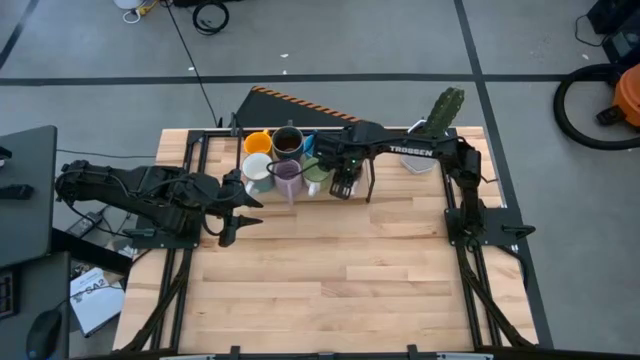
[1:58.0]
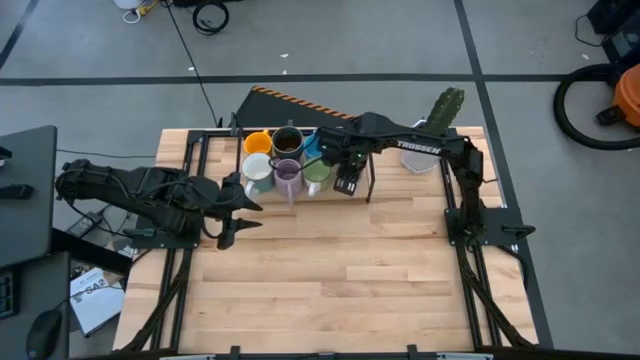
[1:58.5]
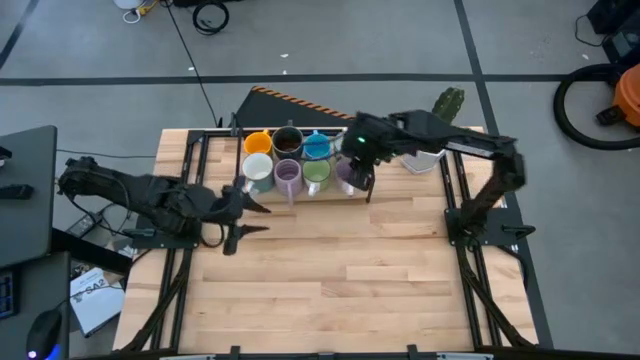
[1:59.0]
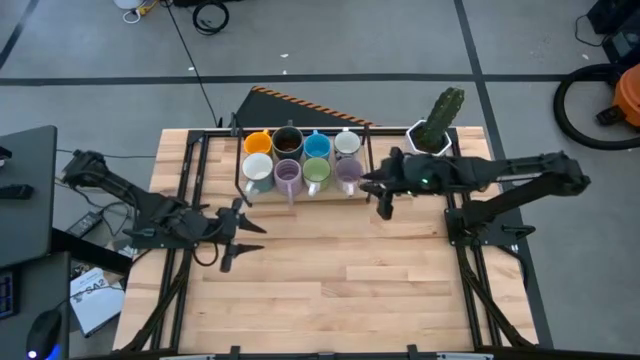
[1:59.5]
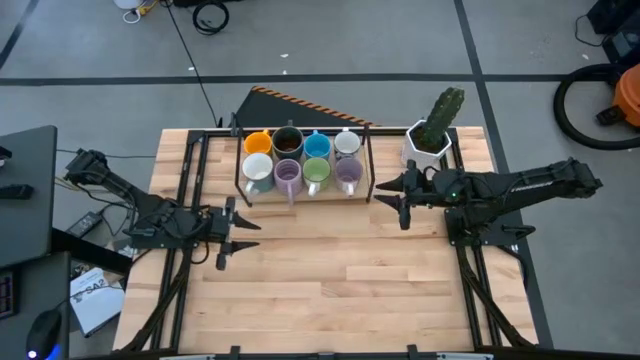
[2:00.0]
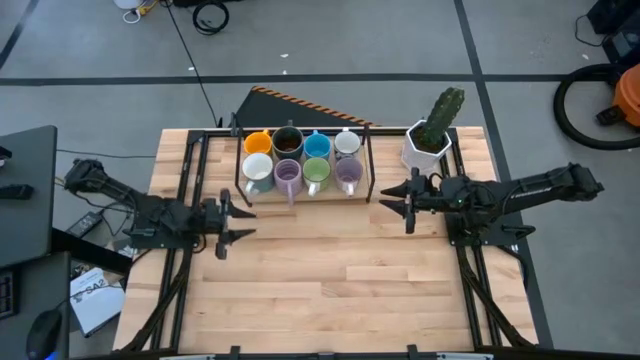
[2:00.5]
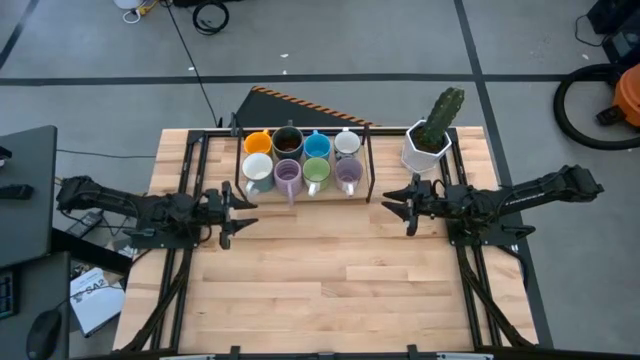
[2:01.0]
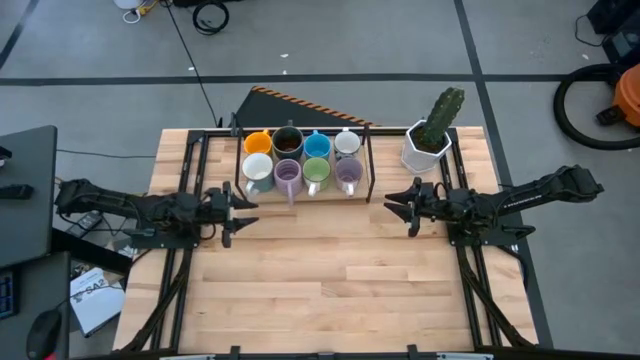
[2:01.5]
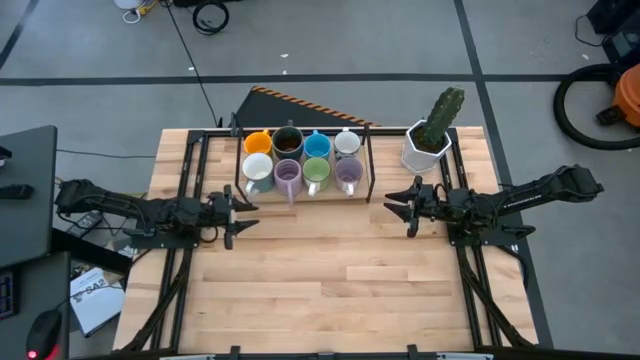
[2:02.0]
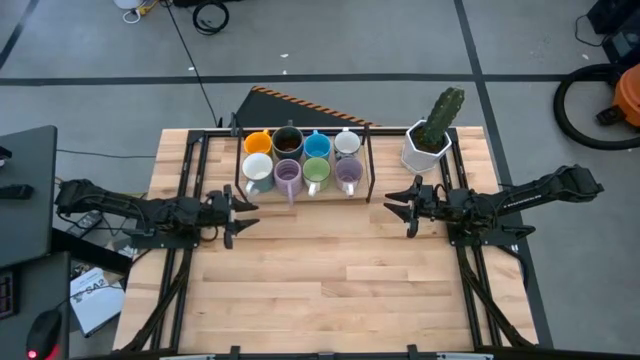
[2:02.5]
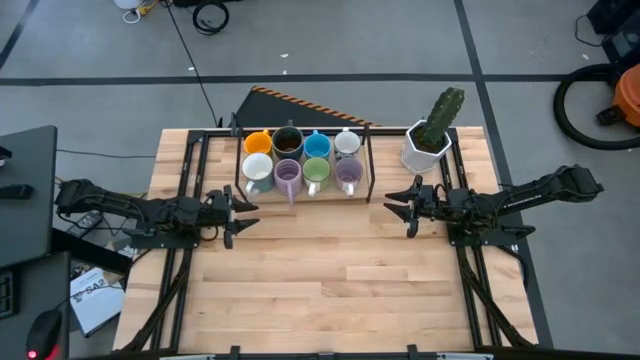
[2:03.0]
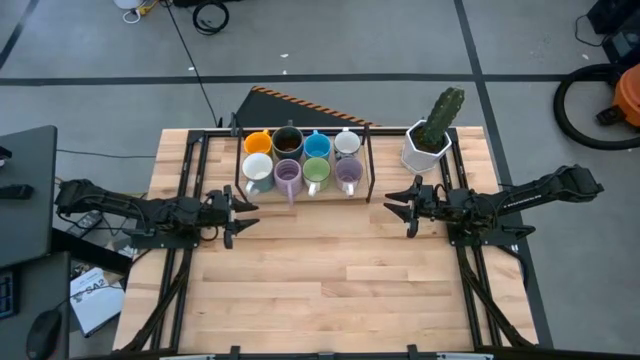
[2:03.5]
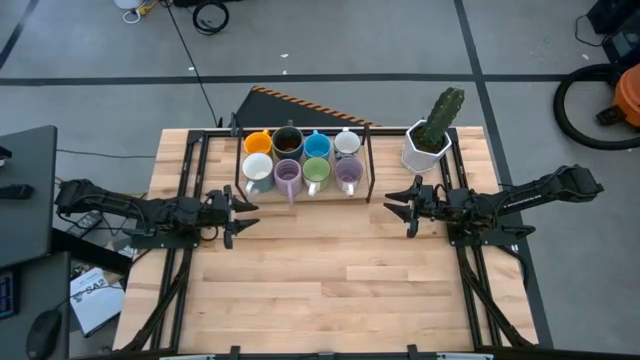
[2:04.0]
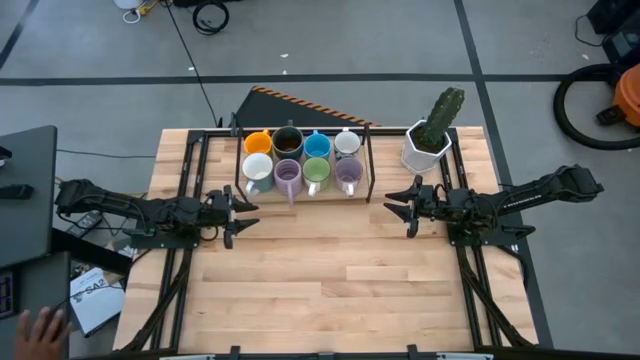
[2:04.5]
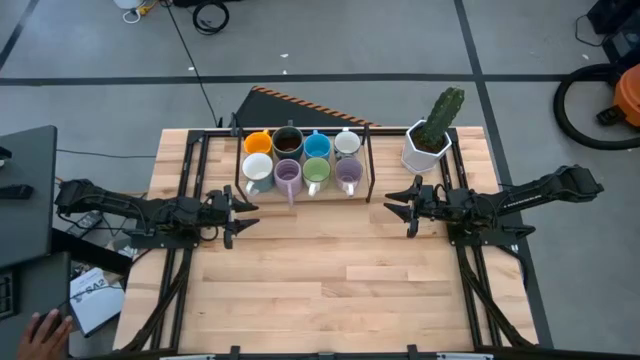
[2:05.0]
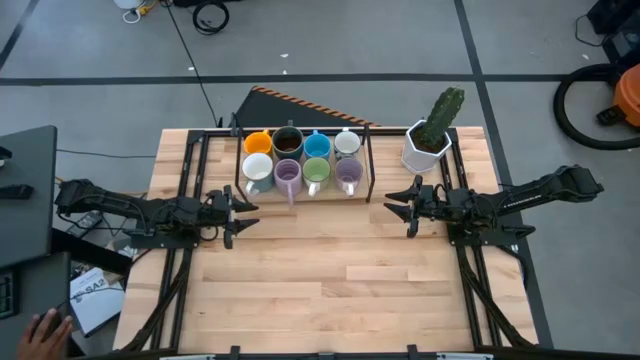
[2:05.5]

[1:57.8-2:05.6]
Task: Place coffee mugs
Return to Home Position

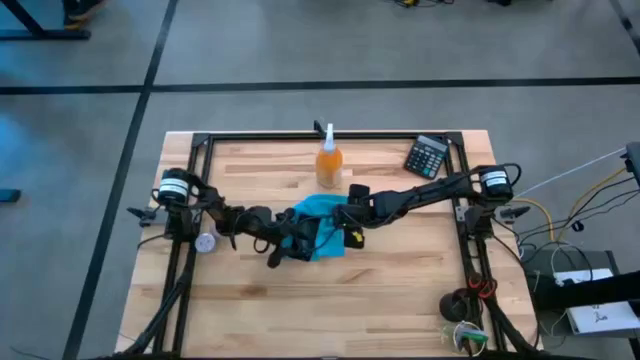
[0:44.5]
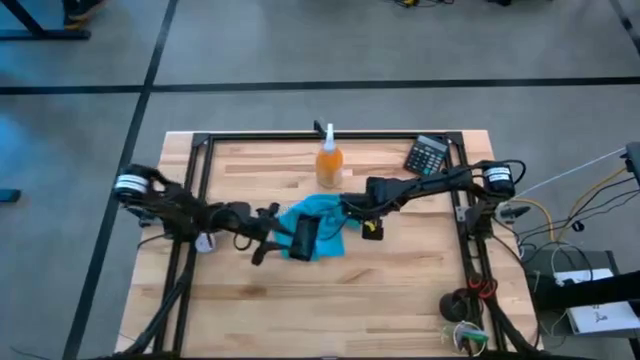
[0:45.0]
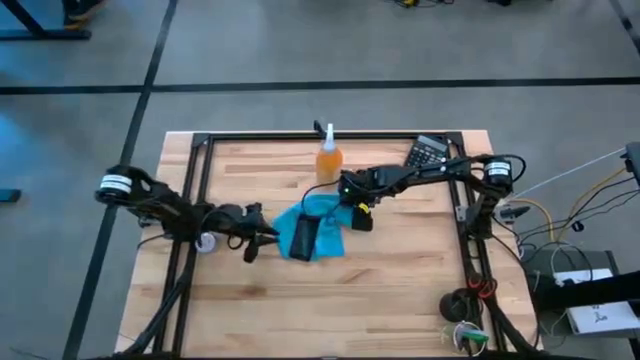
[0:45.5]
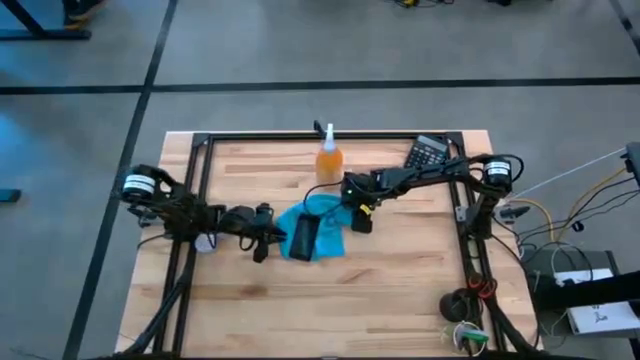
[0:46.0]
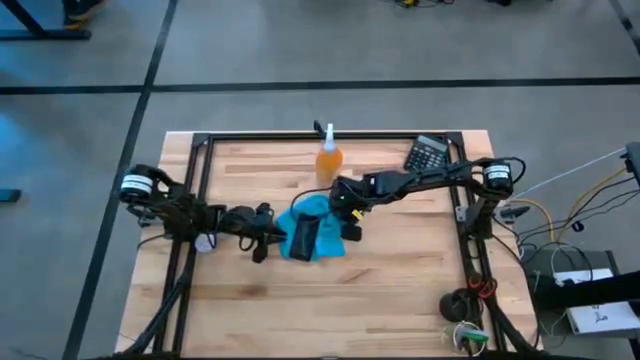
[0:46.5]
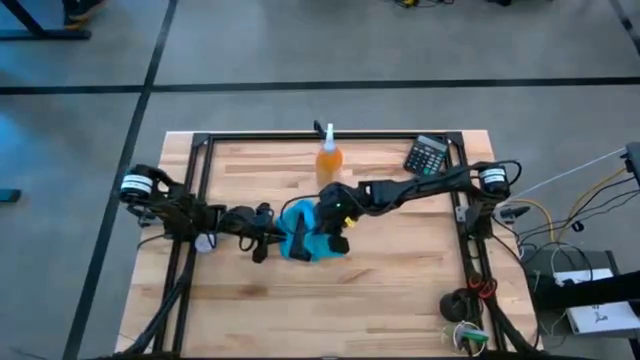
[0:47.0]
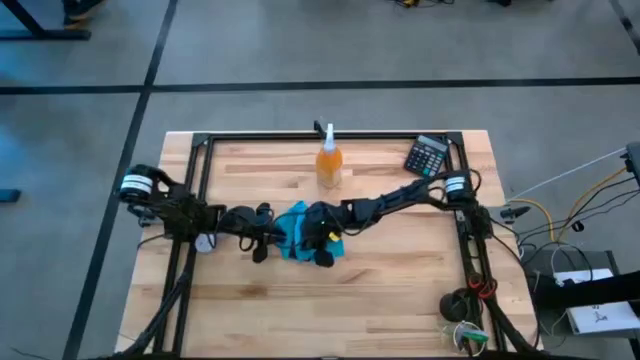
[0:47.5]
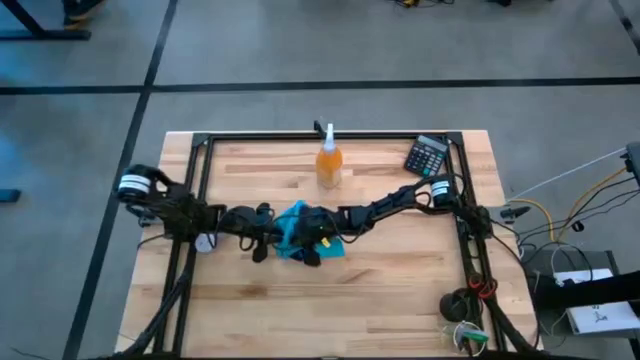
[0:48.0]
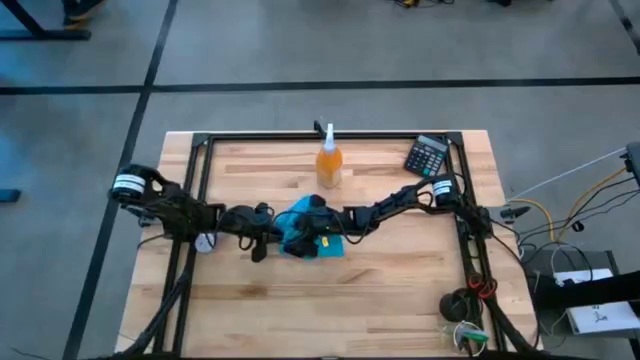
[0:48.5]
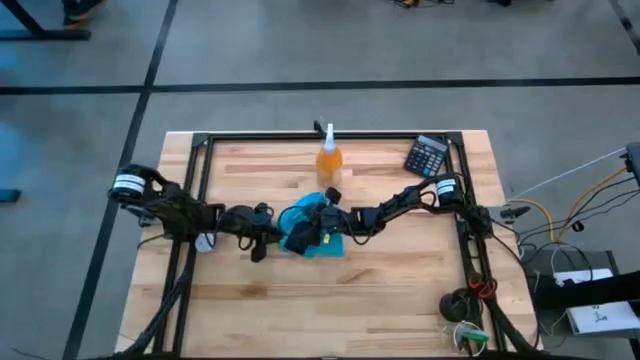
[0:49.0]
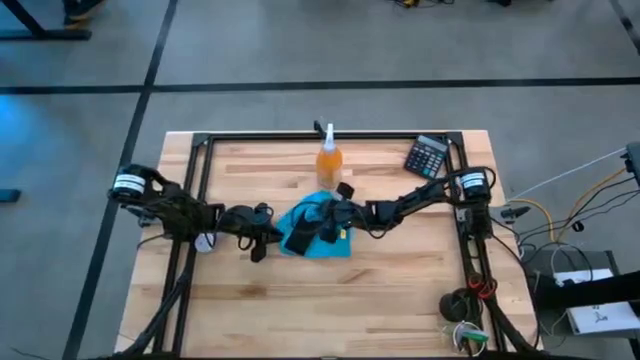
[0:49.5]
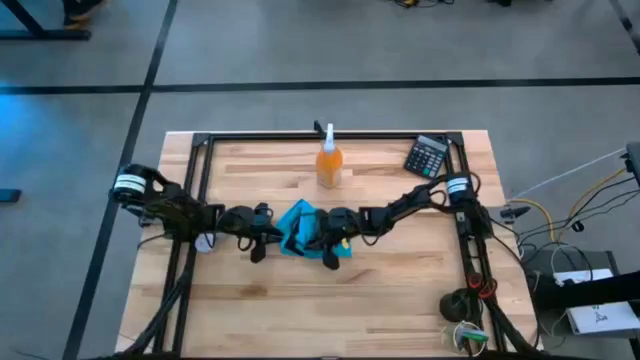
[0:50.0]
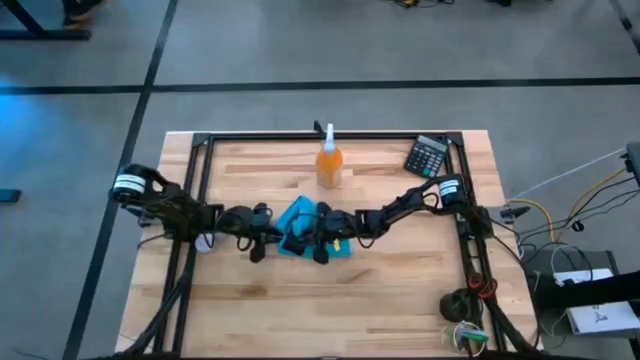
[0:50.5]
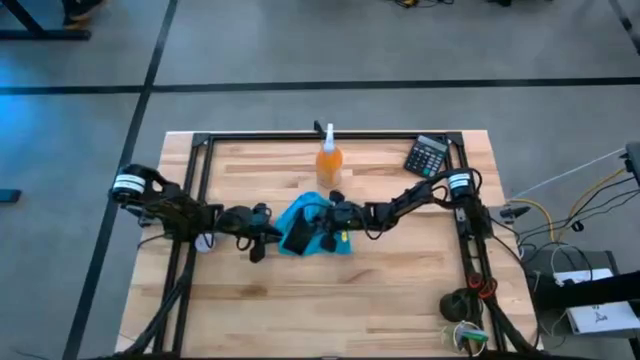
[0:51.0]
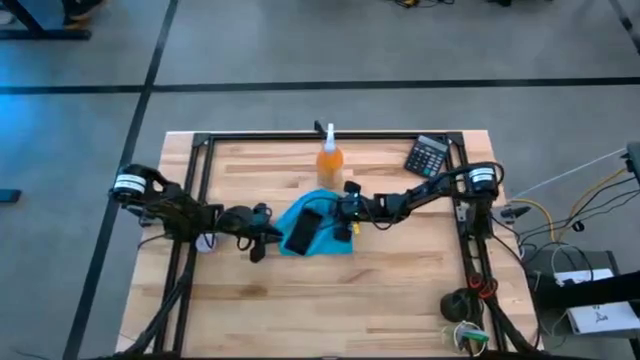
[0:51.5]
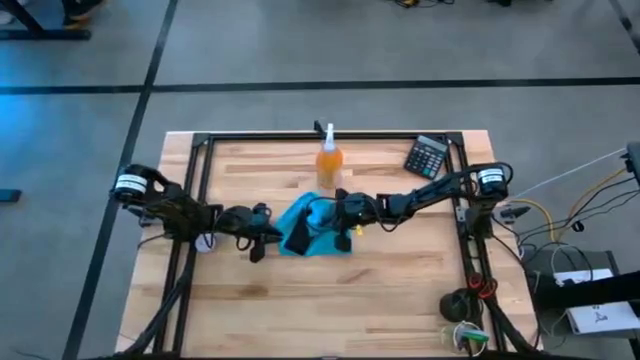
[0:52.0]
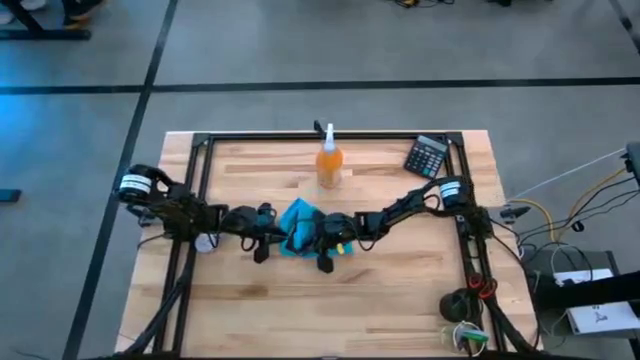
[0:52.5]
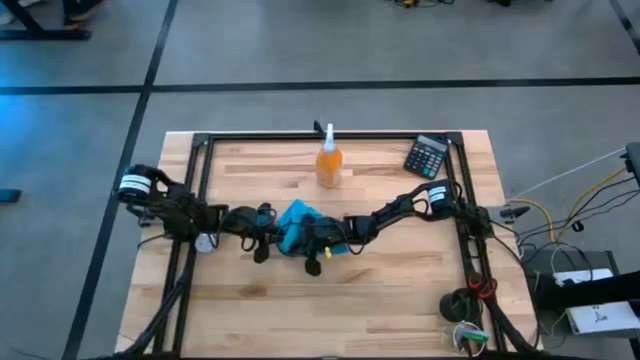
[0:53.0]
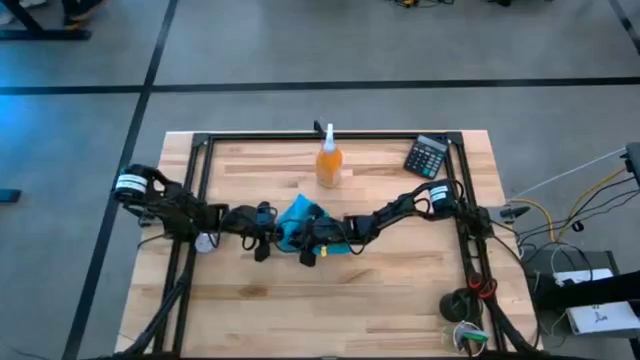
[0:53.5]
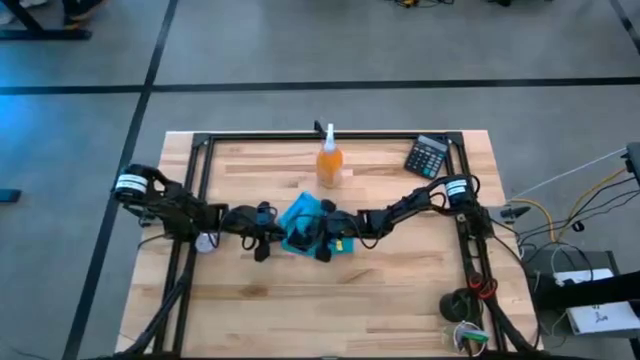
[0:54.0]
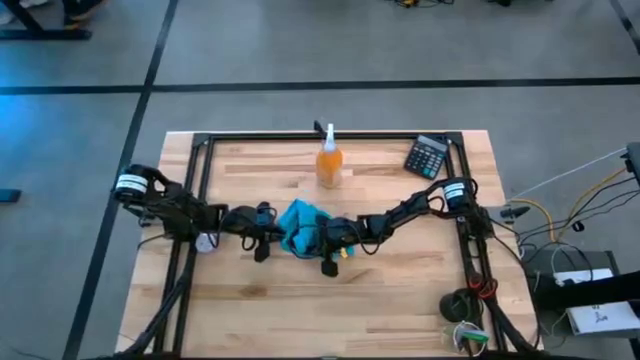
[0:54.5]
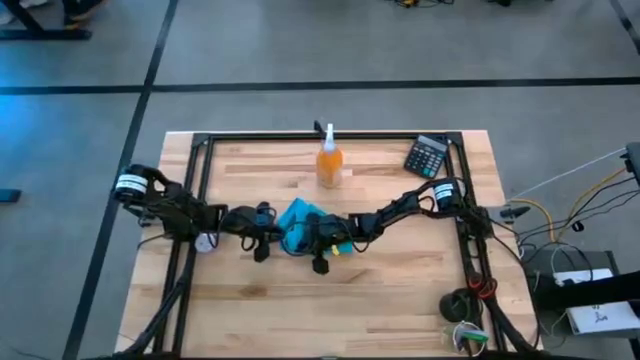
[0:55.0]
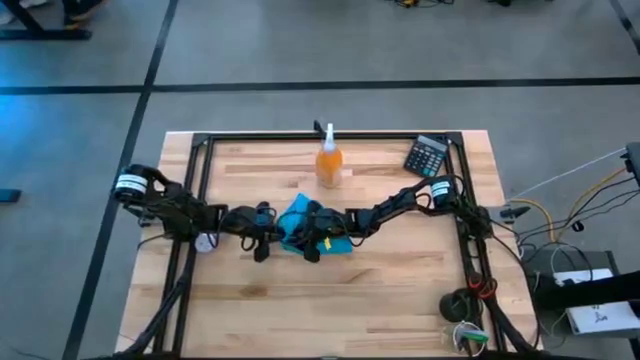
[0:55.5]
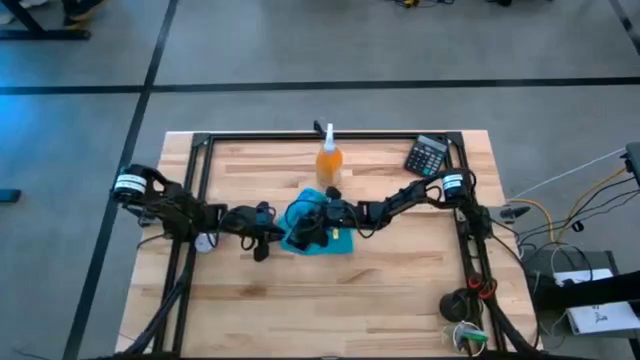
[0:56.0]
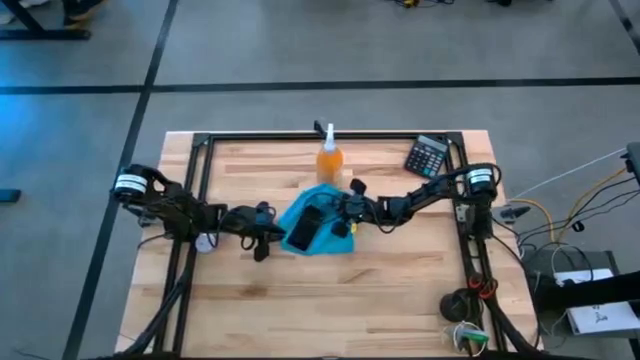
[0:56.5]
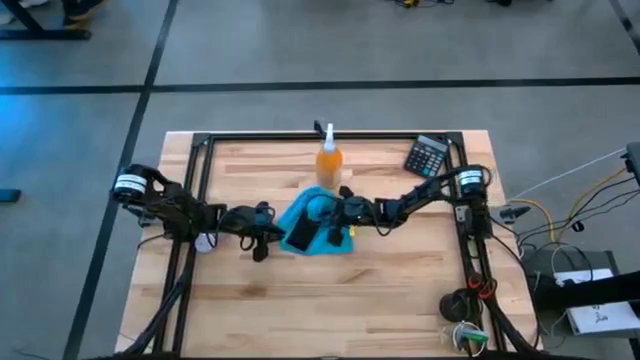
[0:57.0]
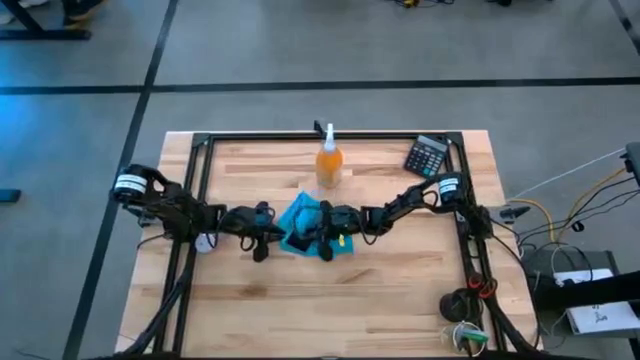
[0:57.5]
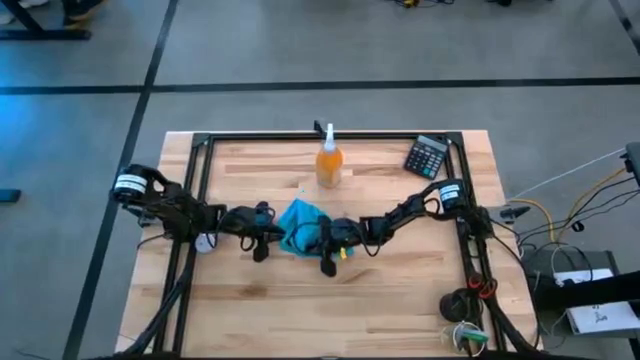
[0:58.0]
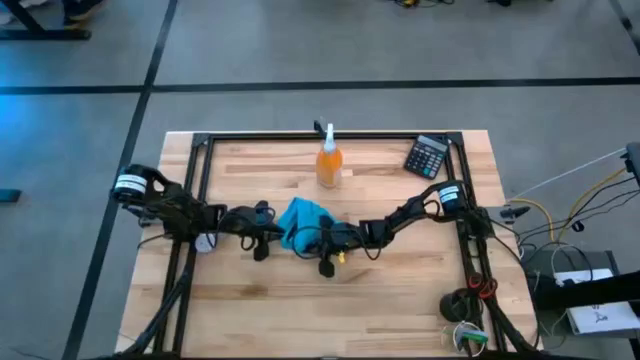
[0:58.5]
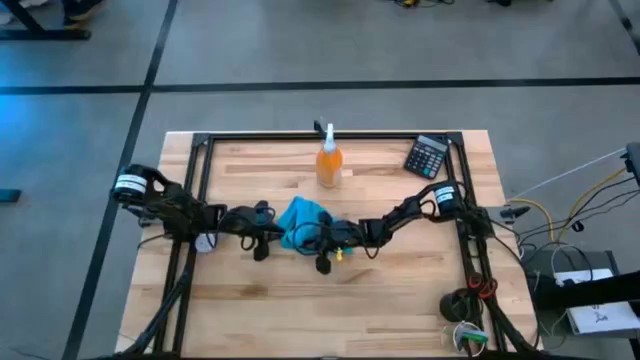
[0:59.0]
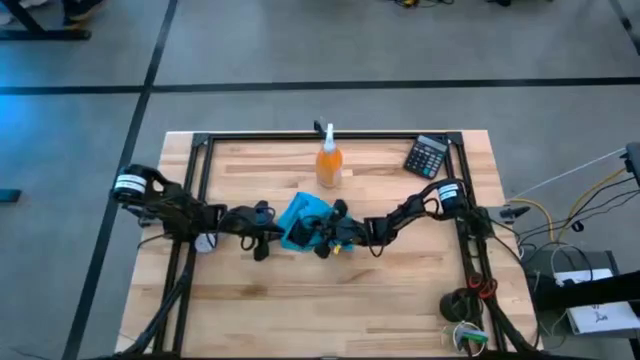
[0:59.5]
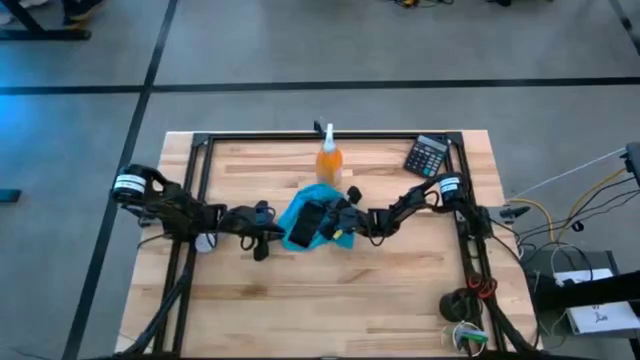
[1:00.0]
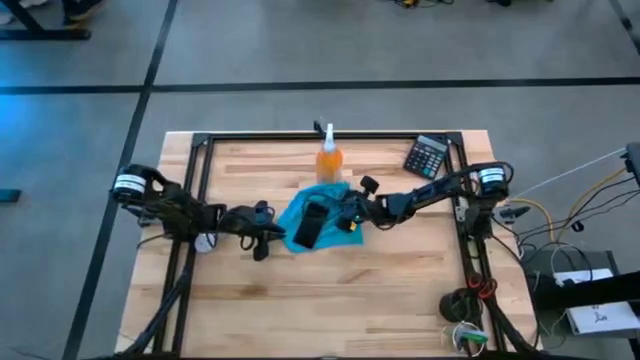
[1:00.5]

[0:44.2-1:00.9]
Task: Apply microfiber cloth
Wipe the front of the pink cellphone using microfiber cloth
